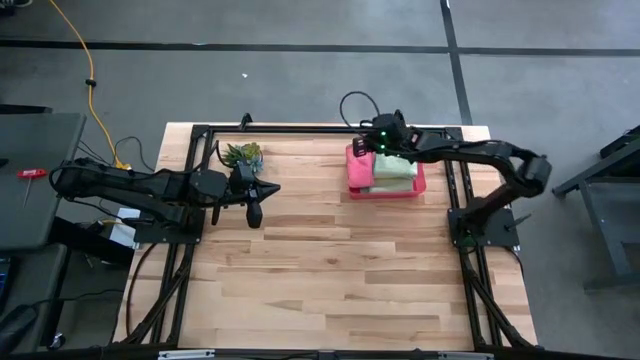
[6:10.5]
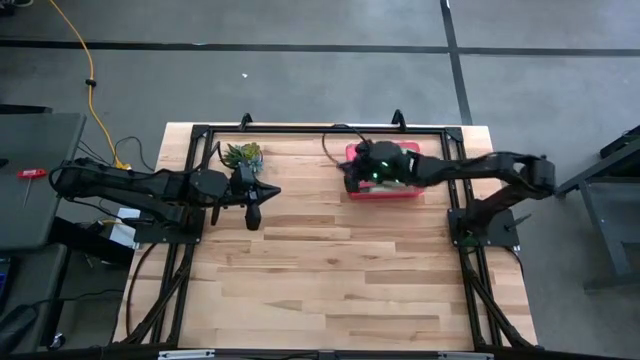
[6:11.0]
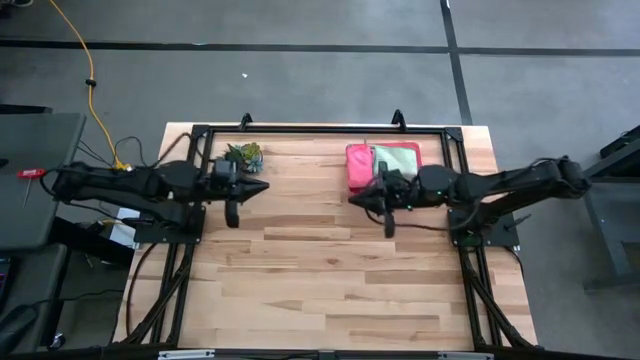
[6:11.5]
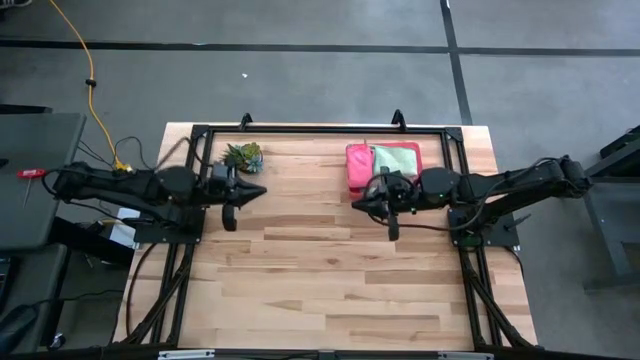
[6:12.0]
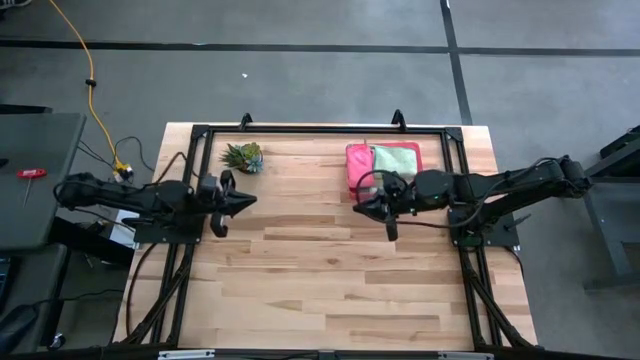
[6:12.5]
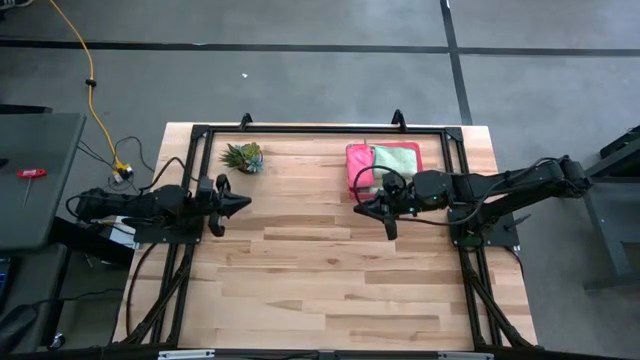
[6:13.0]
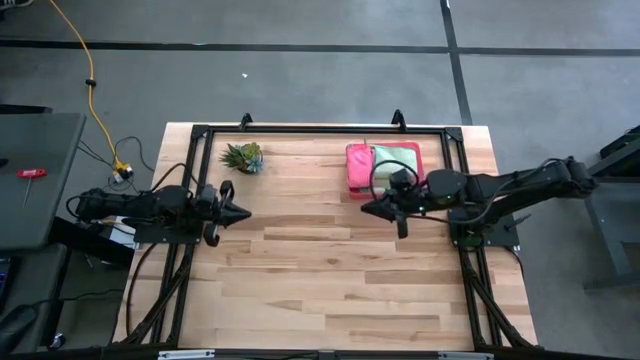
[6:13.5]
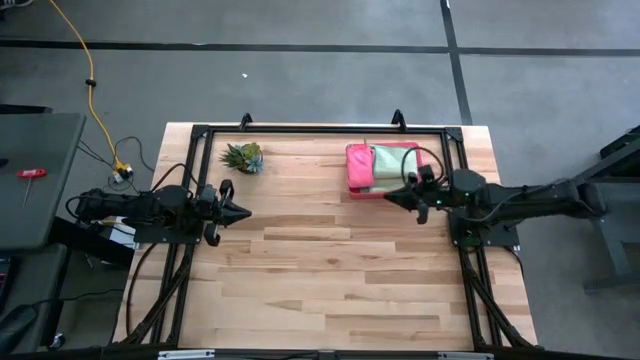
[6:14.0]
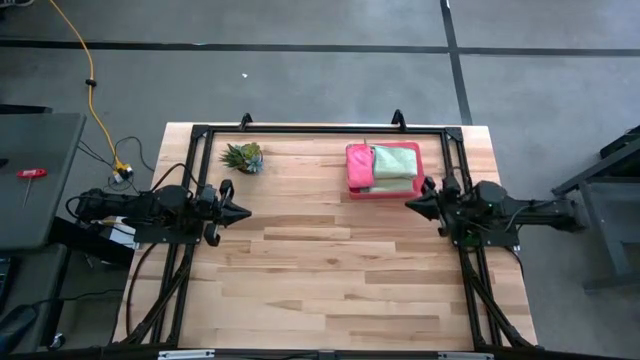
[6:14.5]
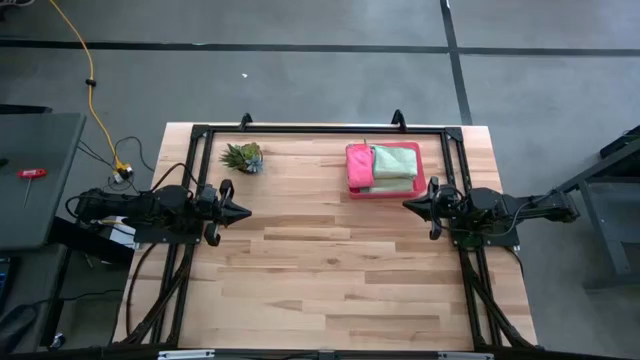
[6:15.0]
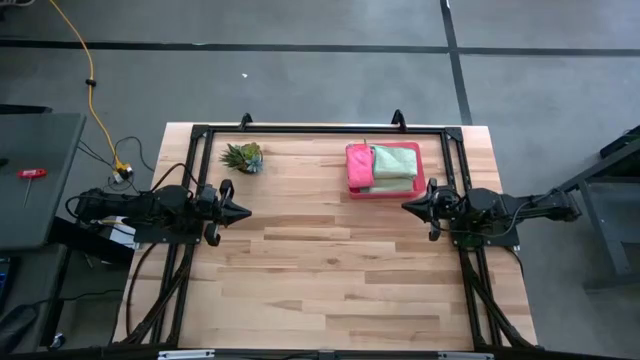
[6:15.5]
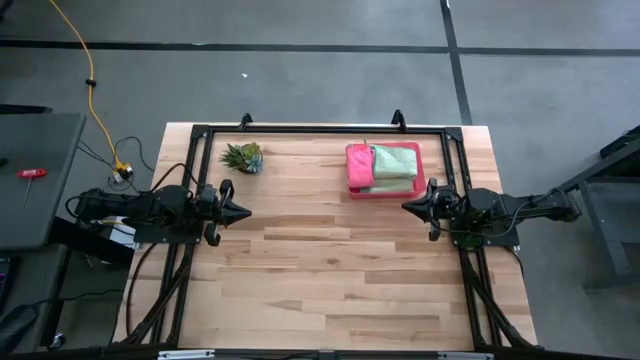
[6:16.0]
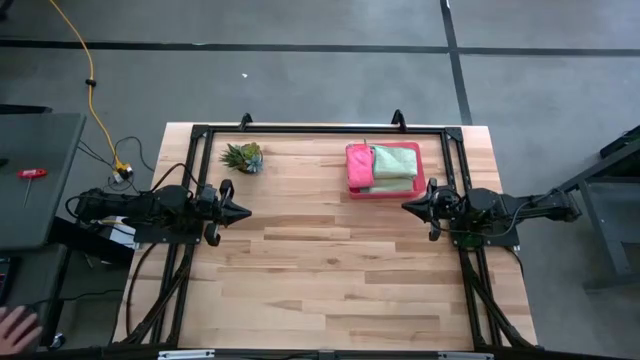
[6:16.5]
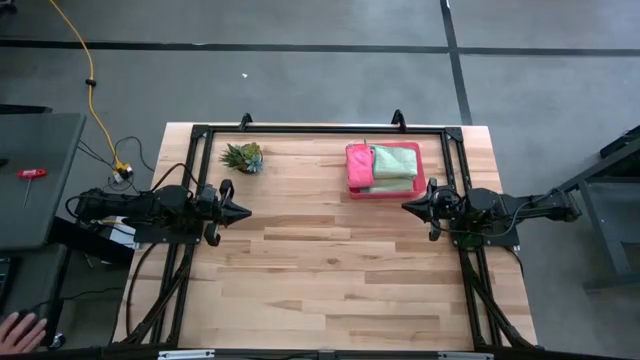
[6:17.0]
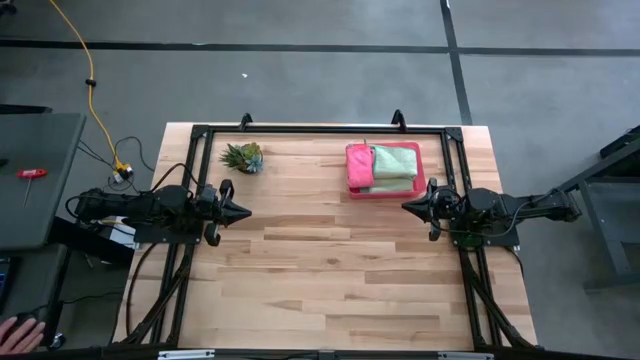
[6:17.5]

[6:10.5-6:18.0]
Task: Fold microfiber towels
Return to Home Position
